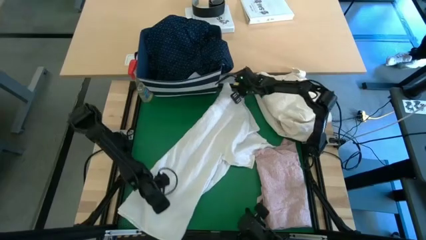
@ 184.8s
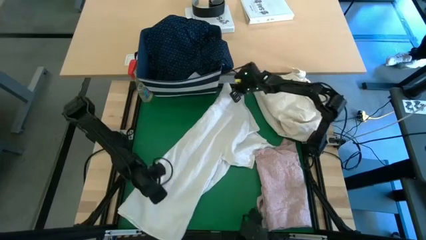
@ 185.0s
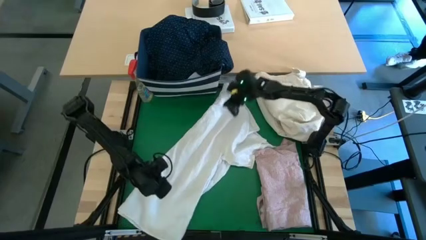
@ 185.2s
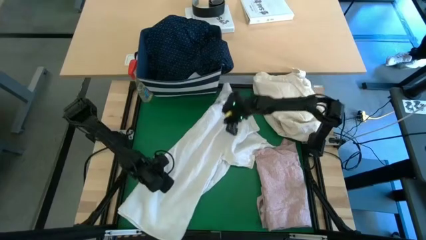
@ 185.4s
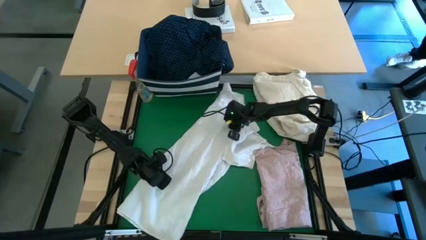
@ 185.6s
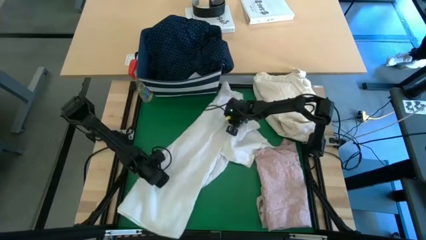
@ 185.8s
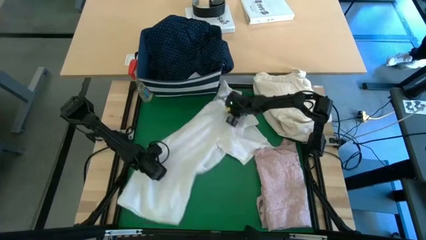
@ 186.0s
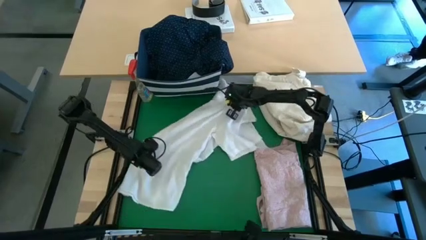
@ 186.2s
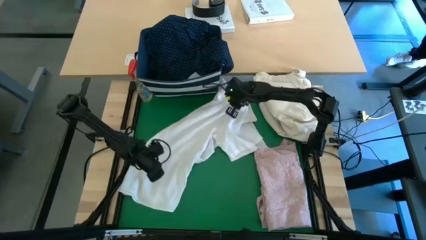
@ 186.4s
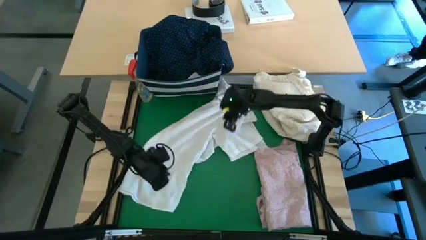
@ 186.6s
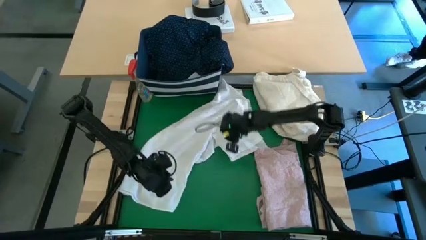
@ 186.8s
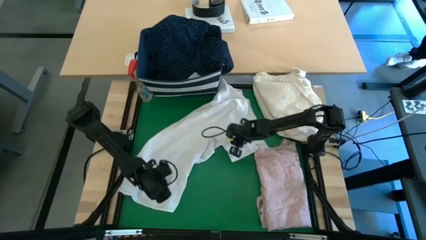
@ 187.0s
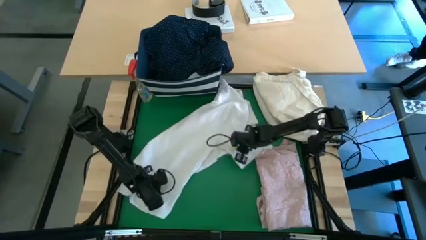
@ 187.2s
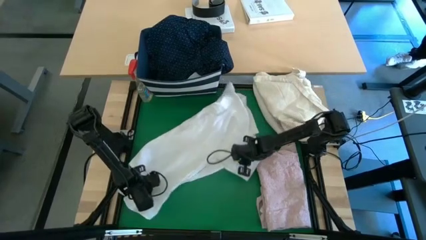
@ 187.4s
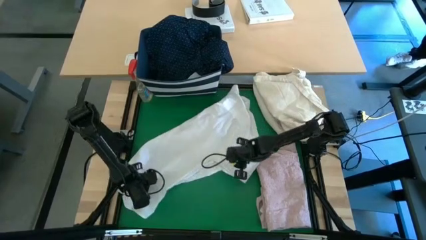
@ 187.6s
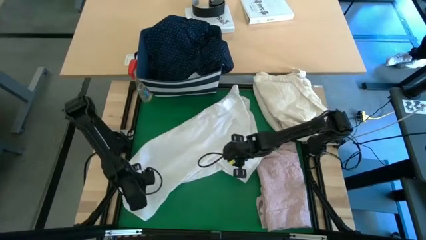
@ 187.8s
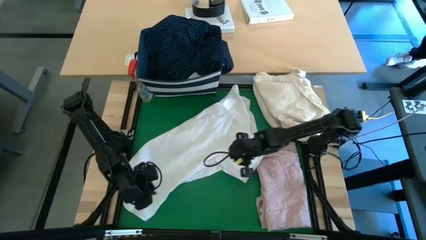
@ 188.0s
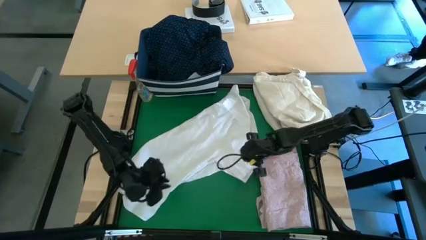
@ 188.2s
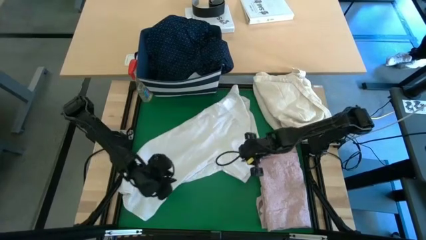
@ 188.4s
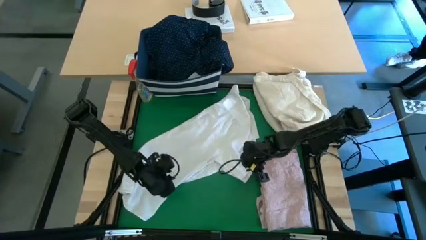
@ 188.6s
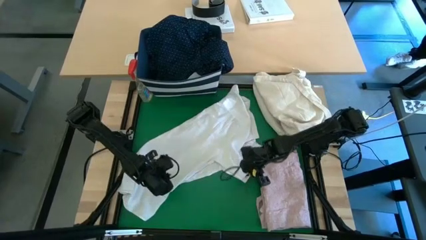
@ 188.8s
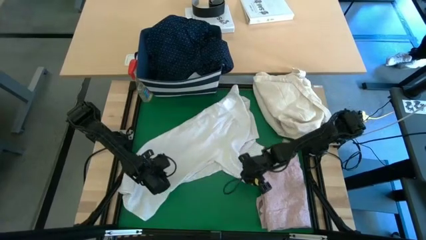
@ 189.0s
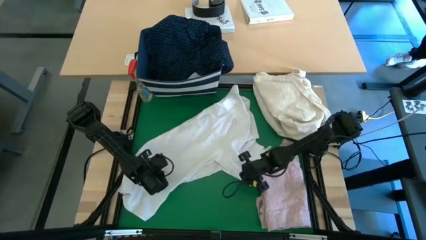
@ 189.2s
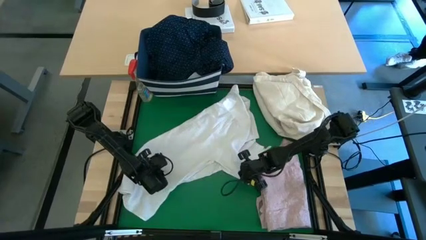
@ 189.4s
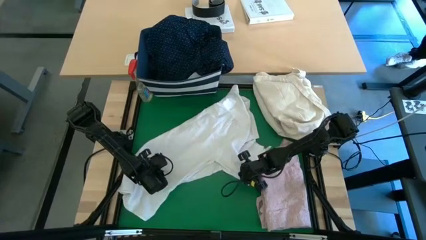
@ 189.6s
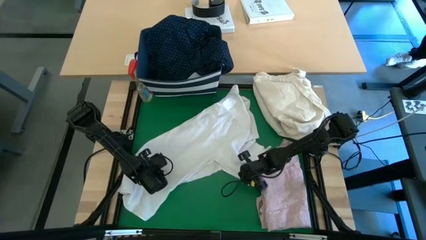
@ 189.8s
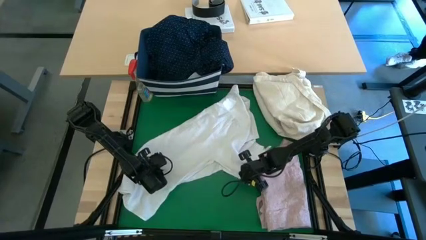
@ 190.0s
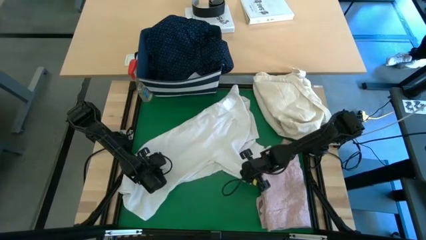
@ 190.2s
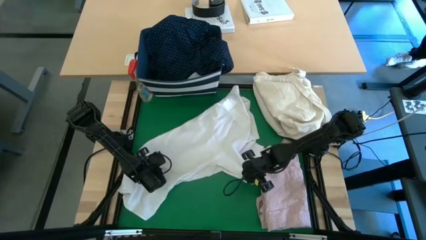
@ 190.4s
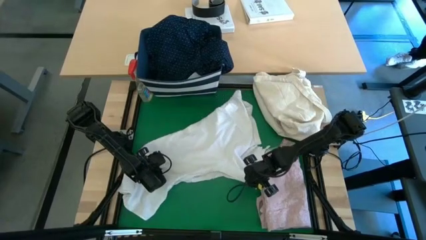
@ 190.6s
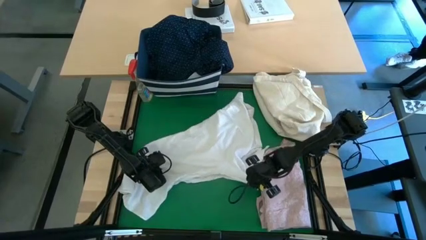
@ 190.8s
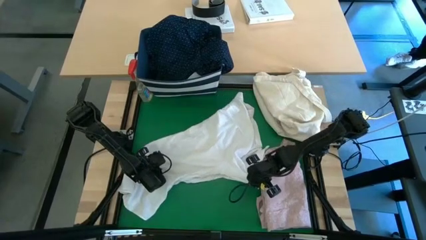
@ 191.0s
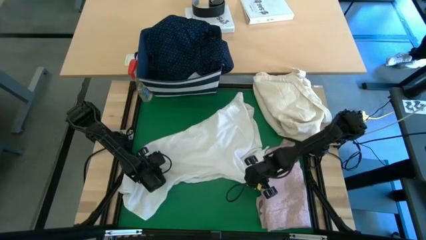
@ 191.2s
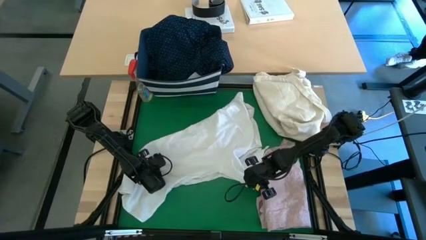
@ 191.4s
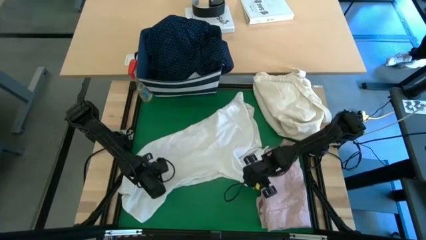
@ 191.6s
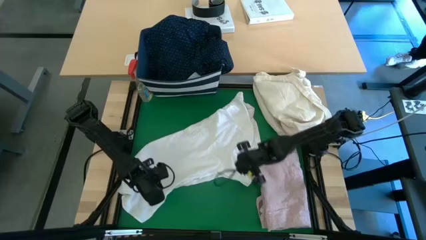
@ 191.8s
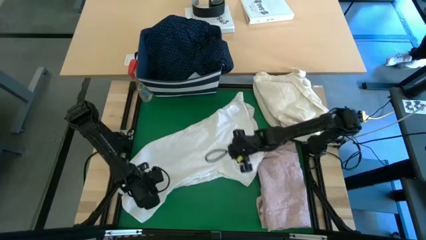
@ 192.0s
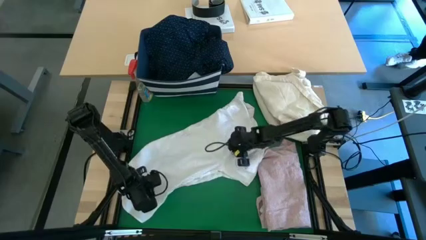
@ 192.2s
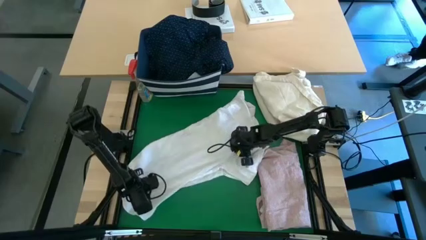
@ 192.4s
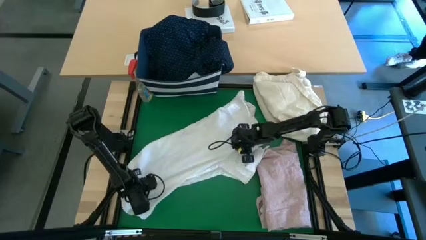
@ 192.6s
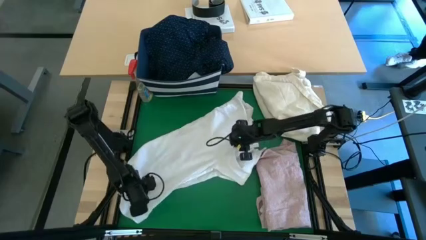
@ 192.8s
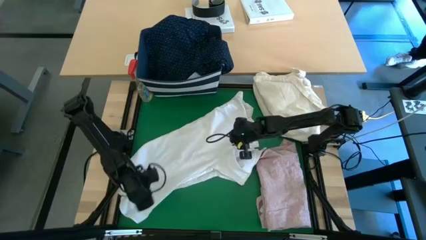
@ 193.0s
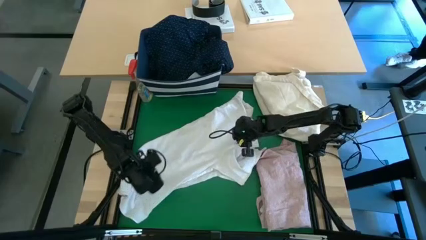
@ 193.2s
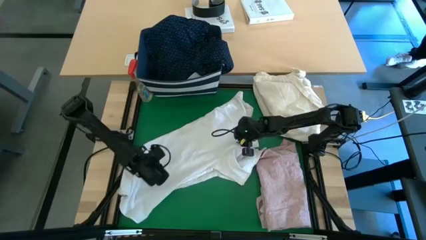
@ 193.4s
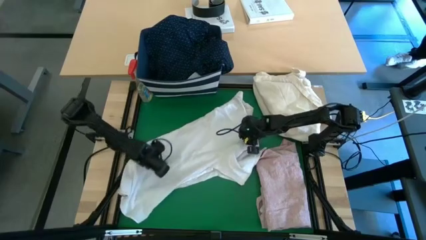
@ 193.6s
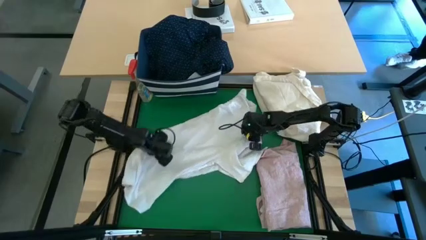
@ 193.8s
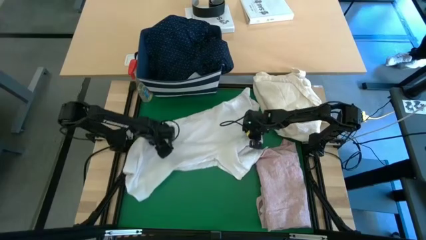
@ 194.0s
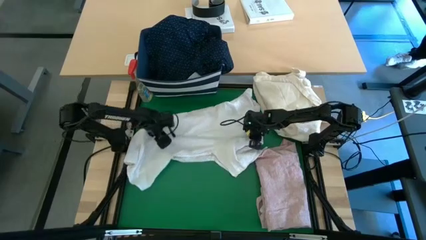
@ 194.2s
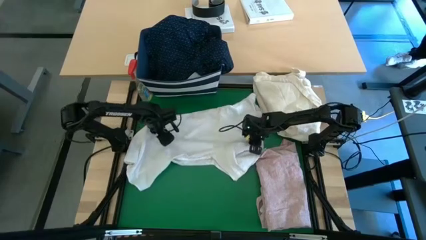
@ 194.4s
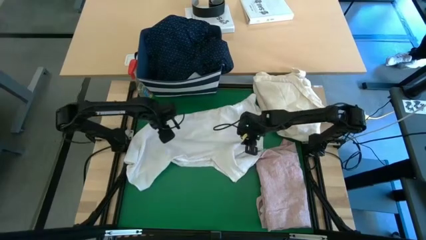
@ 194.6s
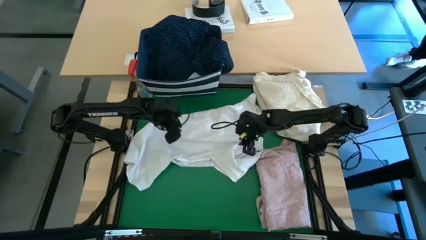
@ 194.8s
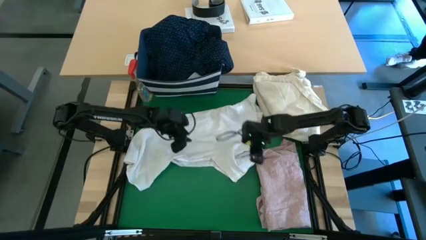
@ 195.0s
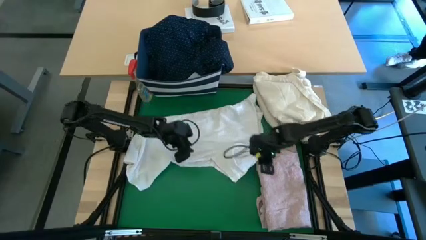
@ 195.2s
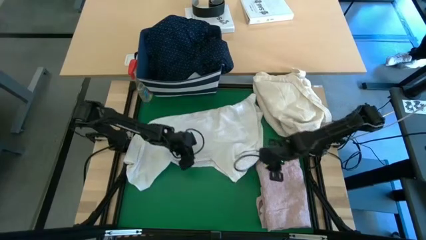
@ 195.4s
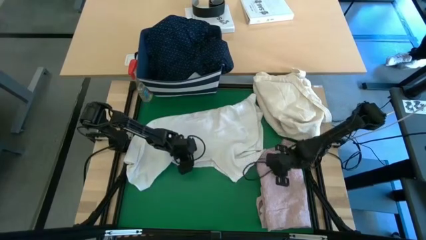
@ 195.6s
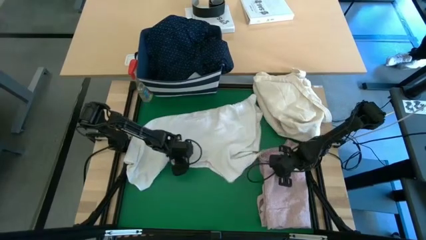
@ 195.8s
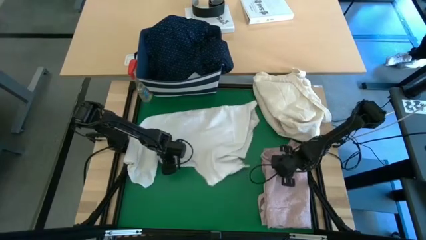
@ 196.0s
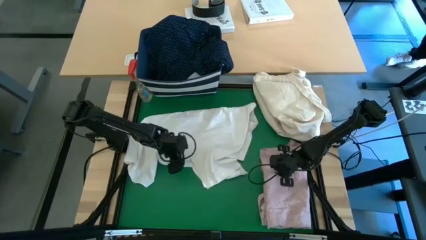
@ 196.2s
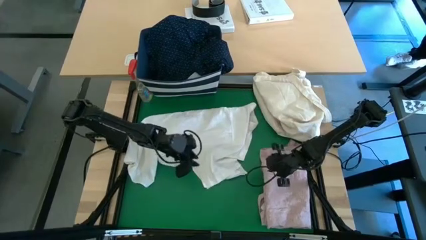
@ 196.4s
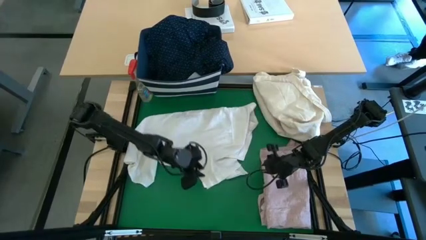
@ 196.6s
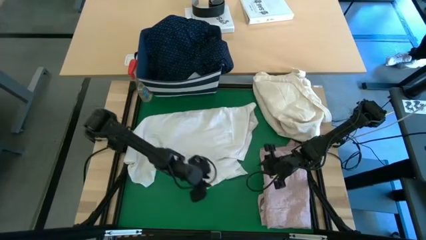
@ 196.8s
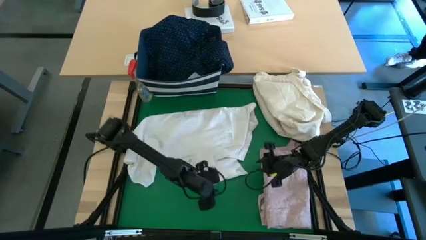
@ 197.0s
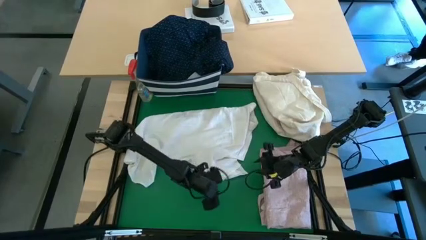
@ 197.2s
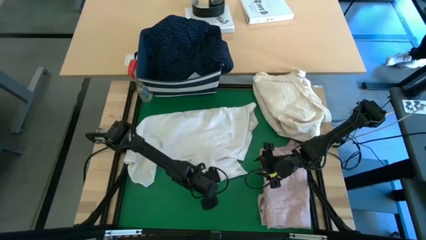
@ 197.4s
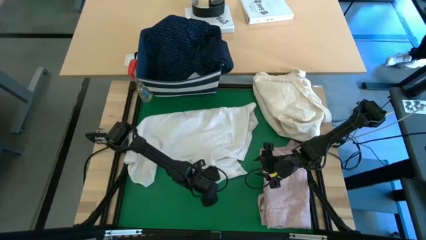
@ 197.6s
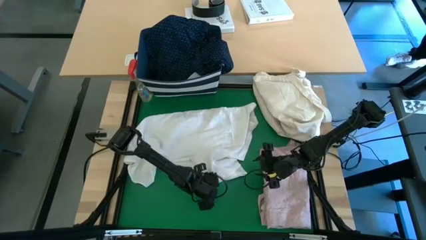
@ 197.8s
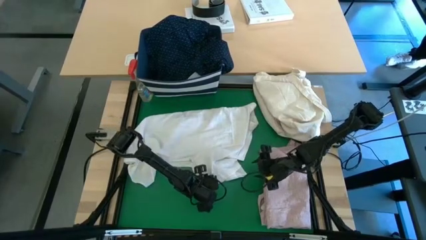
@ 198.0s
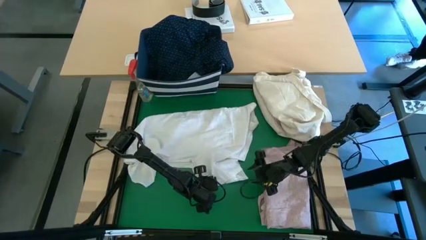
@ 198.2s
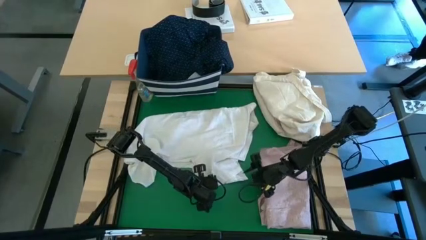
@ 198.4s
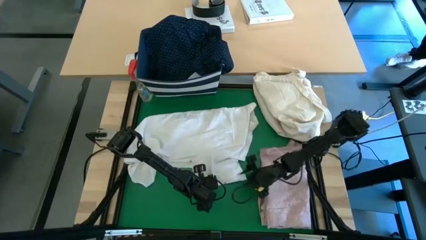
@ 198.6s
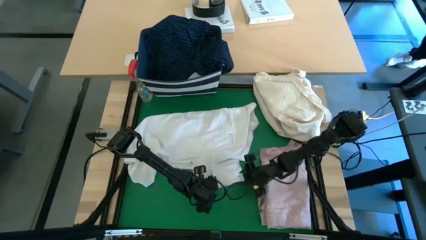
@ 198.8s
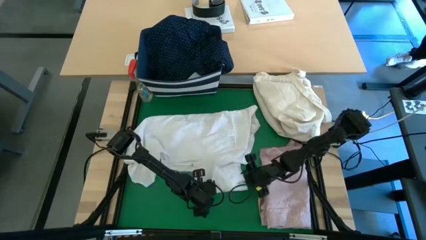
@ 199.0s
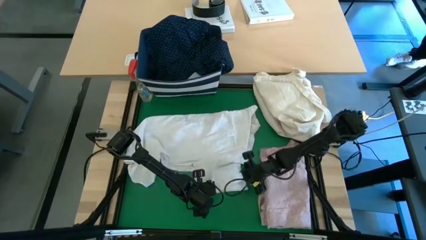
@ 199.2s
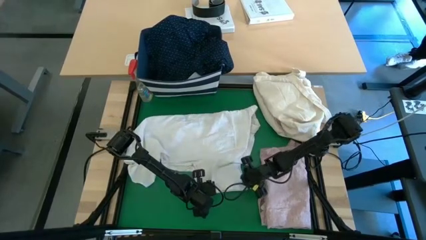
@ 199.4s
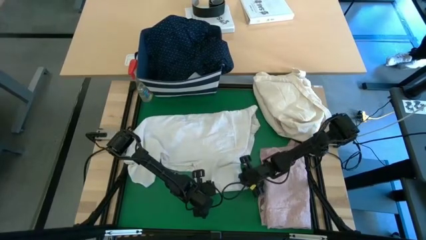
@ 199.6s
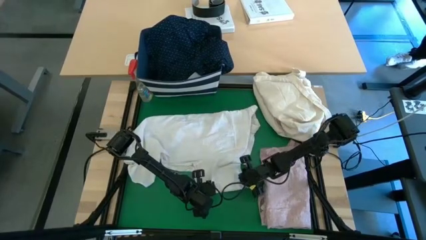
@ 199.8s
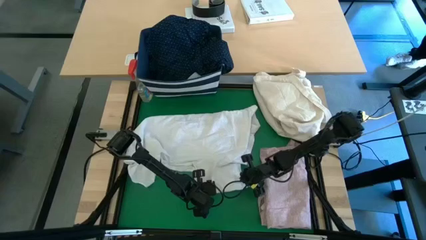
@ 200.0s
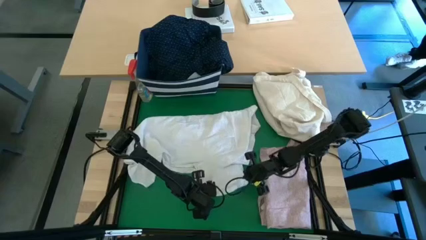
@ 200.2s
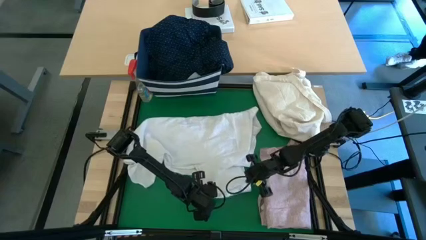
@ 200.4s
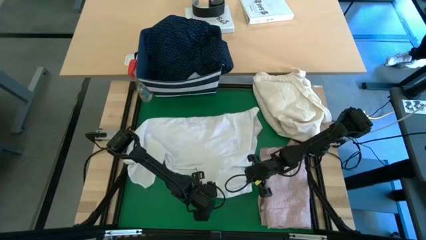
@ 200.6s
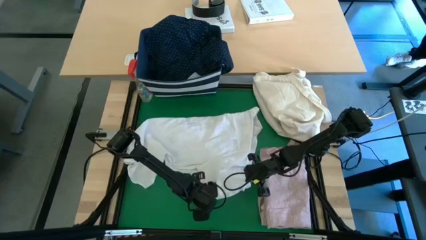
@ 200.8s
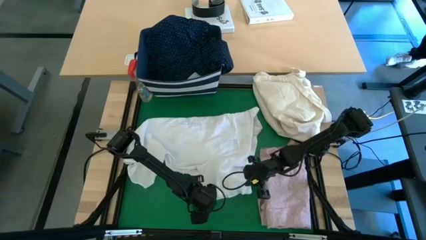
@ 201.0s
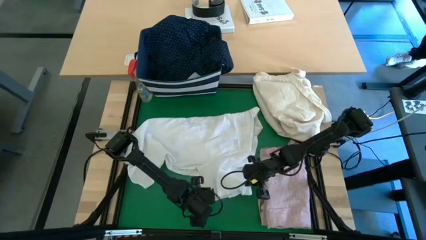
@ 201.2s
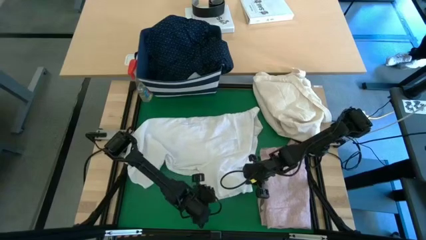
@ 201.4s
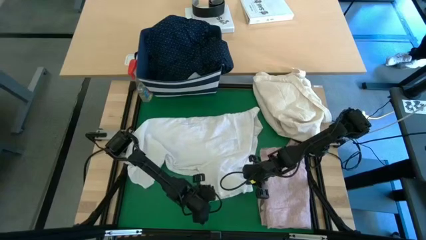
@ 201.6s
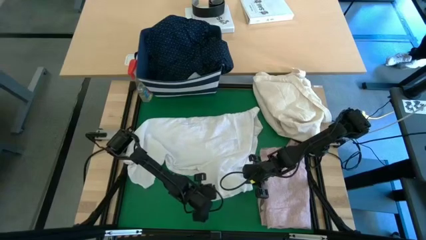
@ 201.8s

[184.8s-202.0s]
Task: Fold laundry
Fold the white polo shirt
